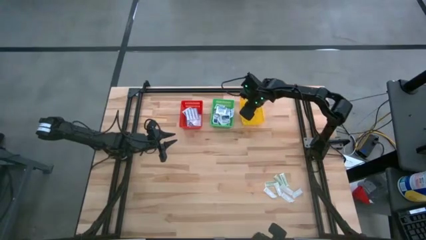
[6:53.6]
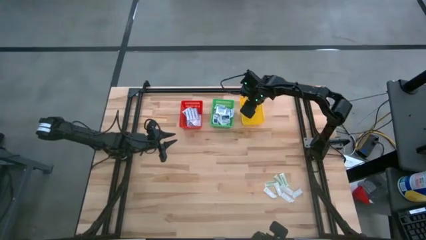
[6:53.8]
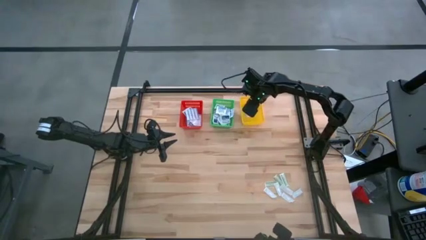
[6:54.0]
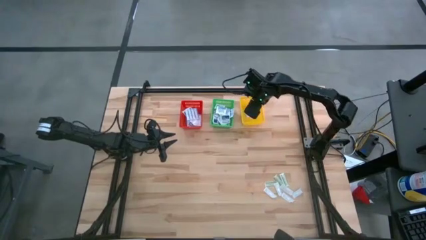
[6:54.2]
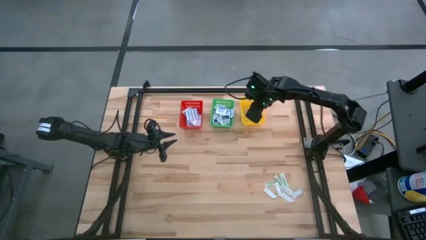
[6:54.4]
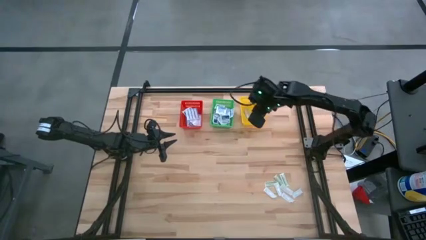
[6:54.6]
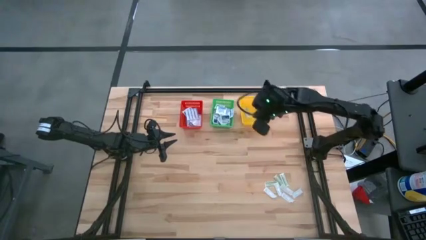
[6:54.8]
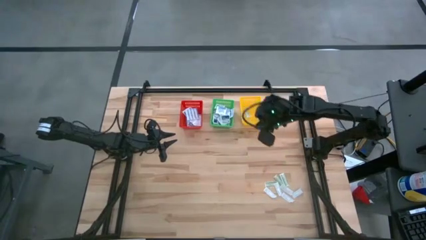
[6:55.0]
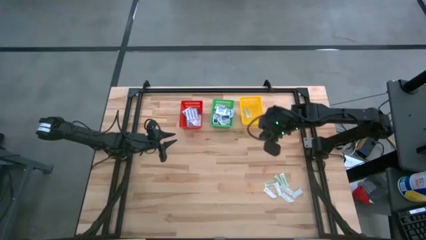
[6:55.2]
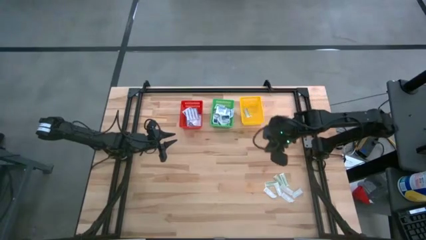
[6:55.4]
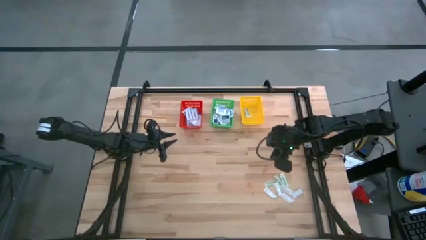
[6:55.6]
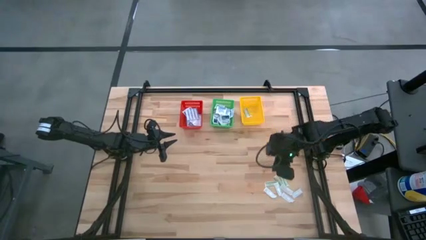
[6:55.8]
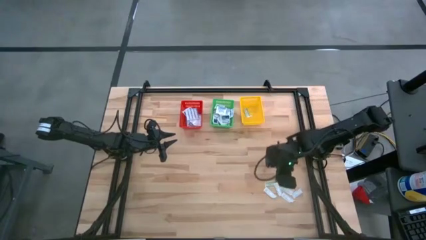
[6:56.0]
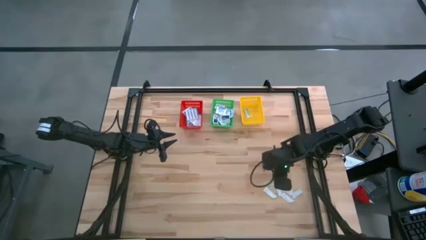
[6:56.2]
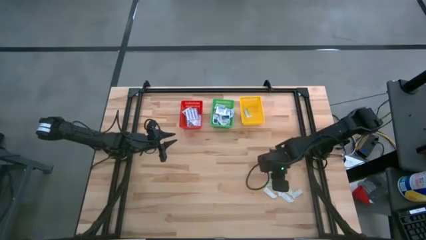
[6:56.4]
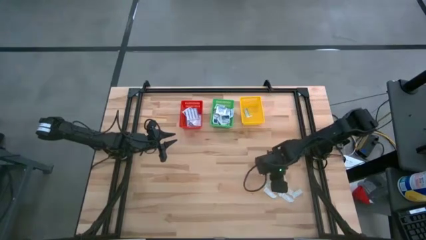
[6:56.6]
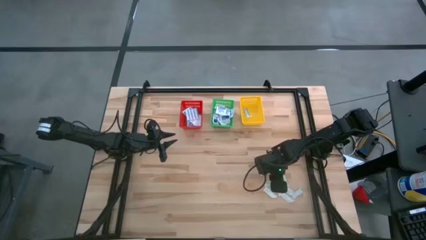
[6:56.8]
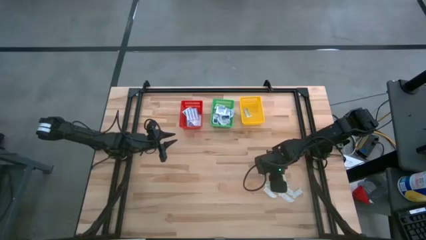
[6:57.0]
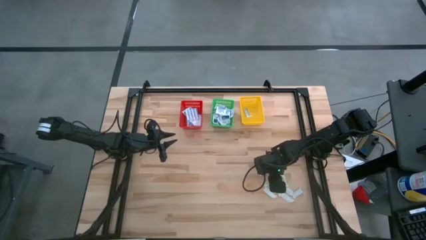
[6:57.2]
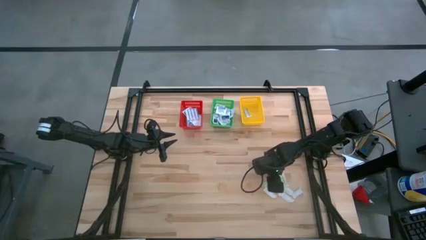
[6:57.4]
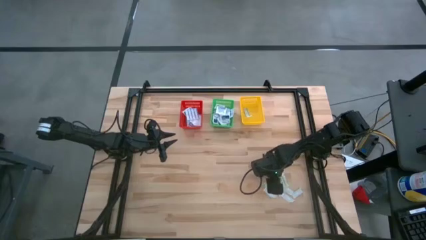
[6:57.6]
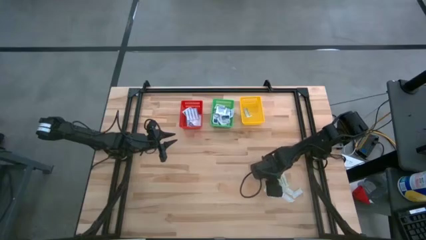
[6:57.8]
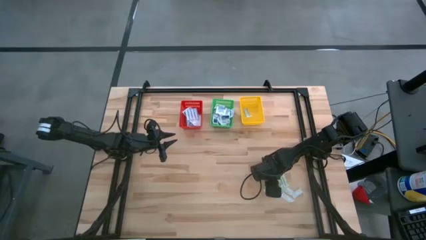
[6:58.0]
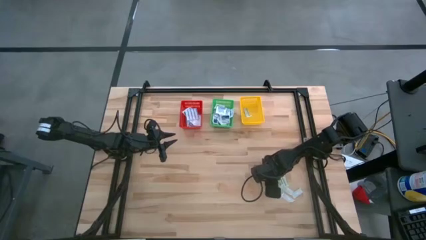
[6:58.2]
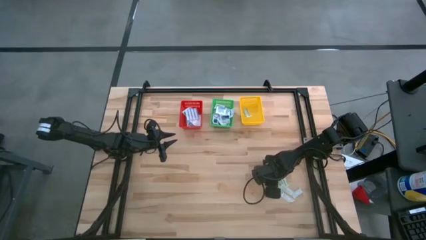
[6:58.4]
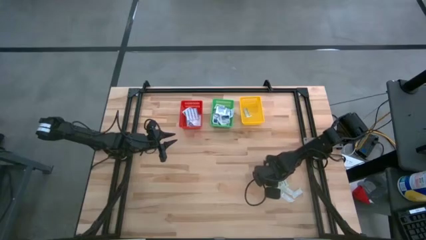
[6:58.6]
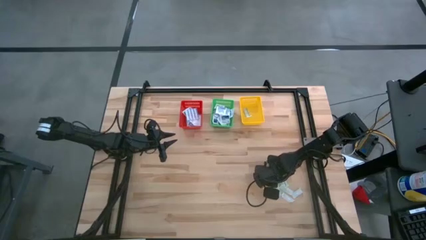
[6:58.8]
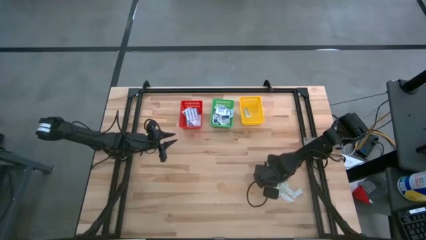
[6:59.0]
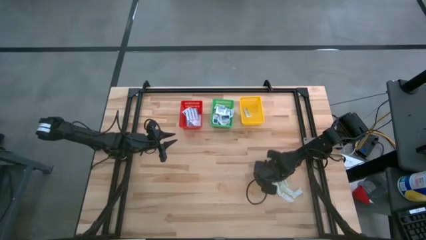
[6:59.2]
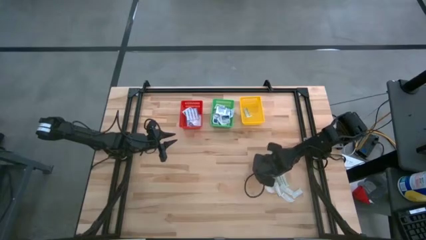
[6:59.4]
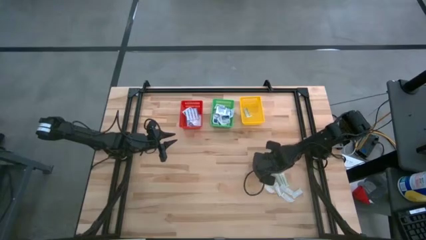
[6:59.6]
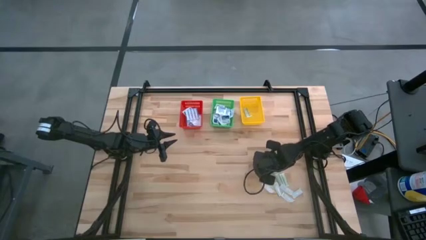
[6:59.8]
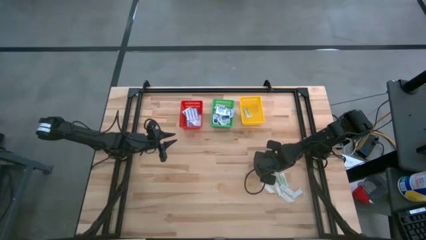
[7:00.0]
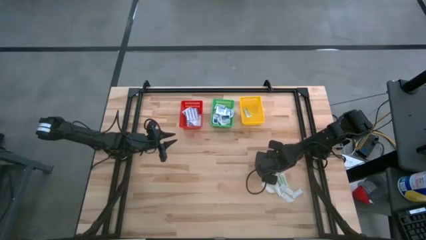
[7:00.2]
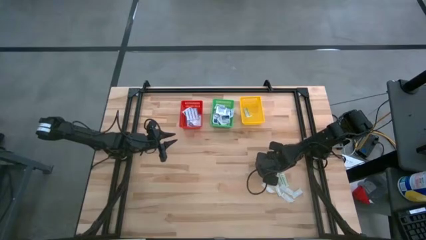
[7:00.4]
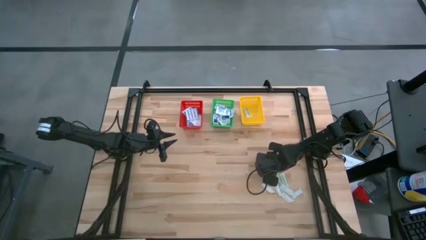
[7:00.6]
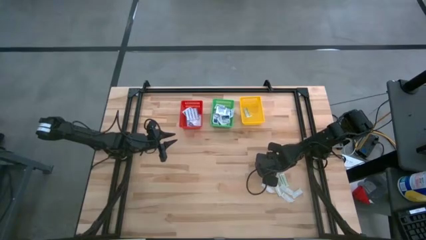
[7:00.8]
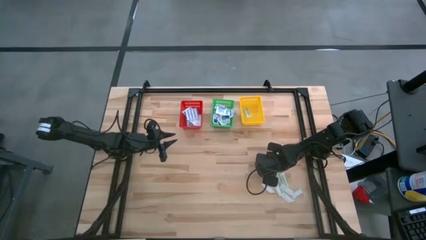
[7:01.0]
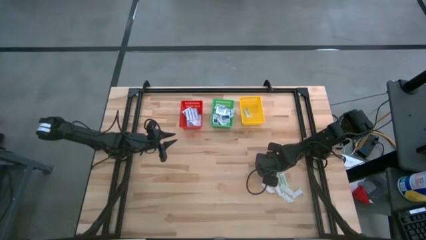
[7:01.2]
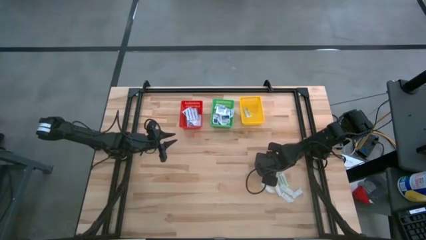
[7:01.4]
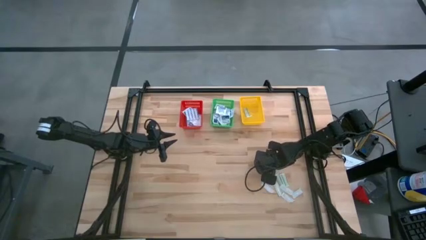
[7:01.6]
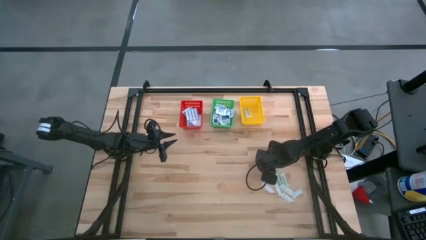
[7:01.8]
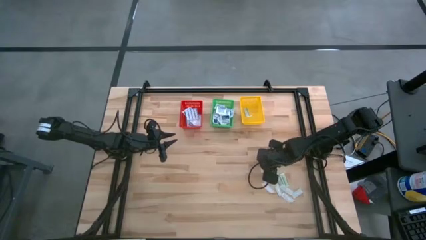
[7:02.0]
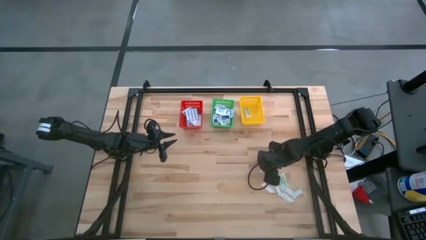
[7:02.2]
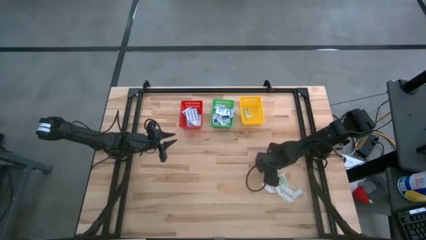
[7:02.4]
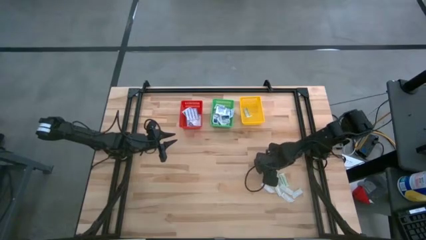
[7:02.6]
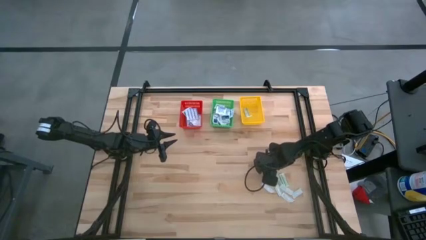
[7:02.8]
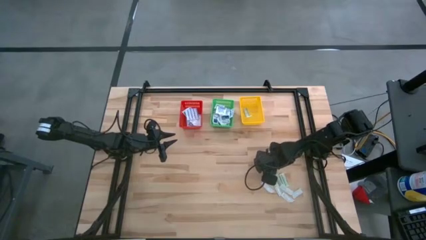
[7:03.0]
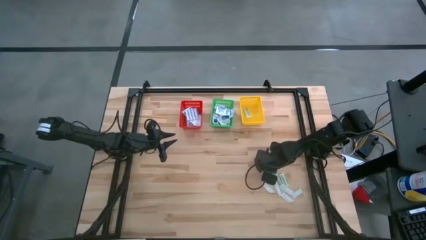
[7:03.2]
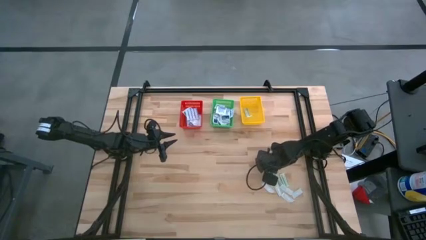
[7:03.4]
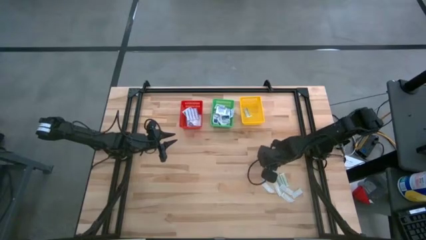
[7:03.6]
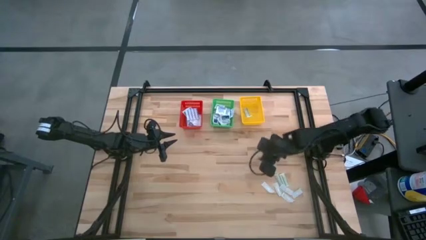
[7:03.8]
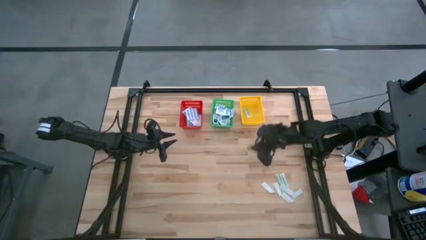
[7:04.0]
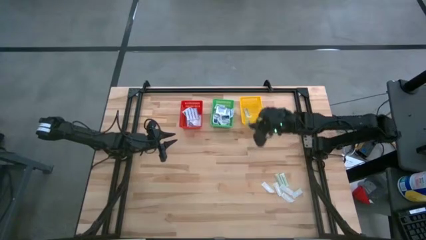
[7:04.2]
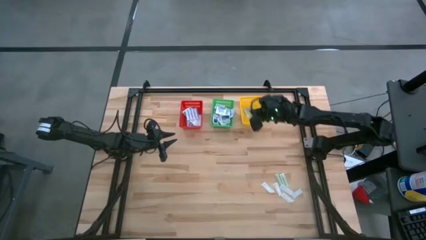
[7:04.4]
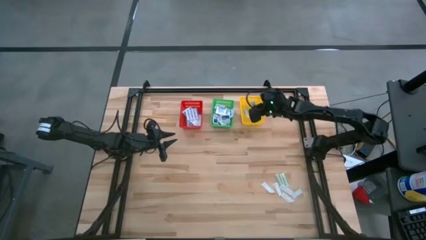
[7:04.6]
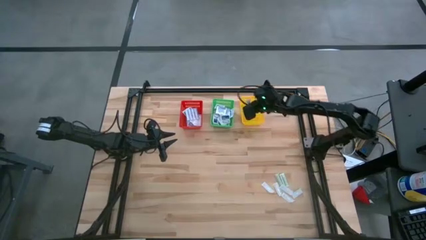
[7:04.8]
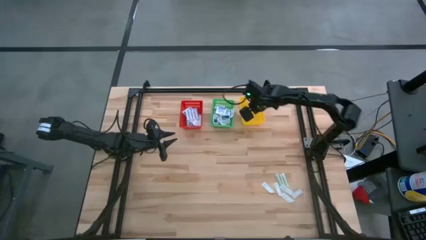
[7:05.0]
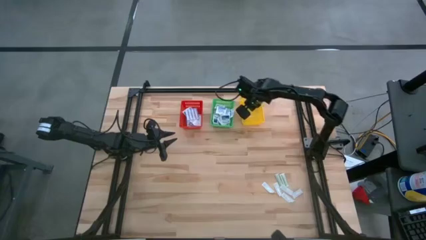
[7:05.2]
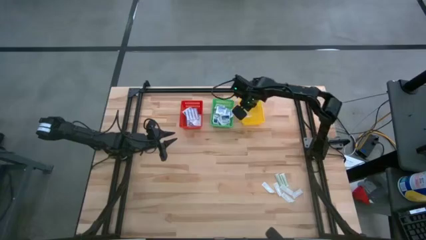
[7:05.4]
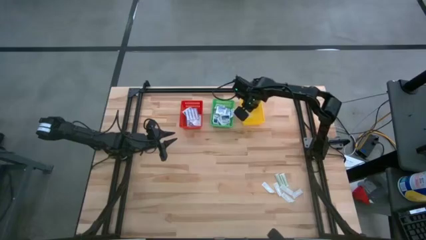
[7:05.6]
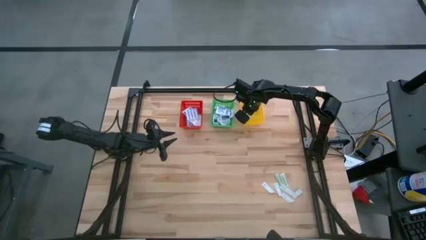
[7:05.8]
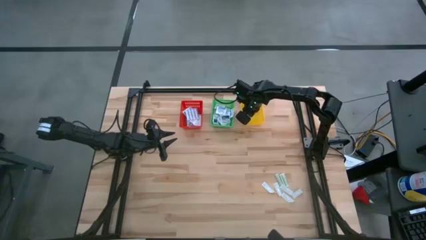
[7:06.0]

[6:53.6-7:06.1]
Task: Pick & Place First Aid Supplies
Put the green bandage into the yellow basket
